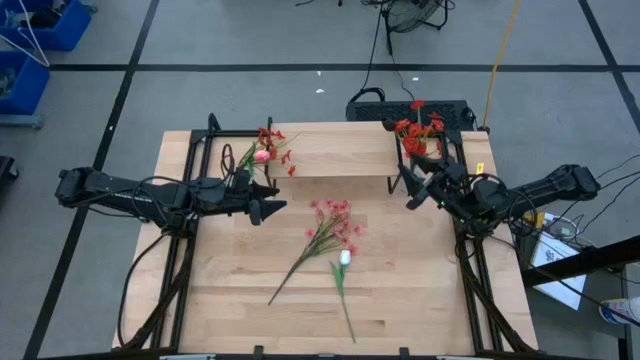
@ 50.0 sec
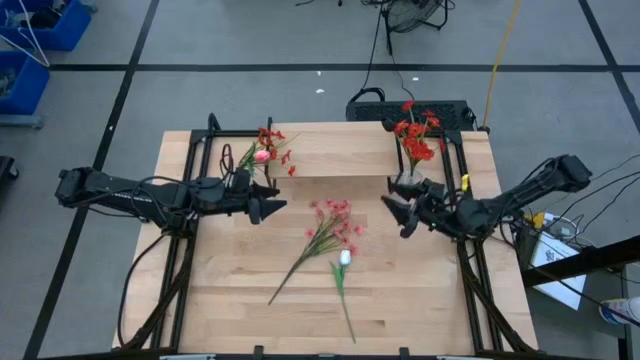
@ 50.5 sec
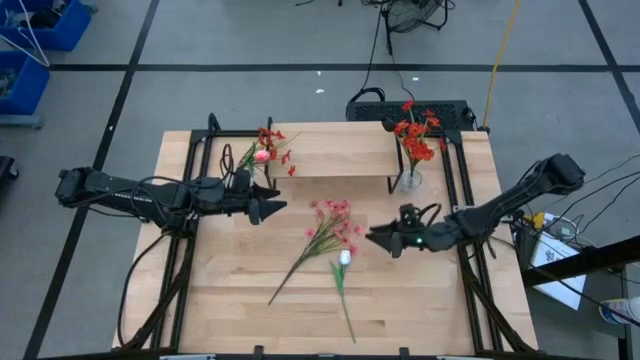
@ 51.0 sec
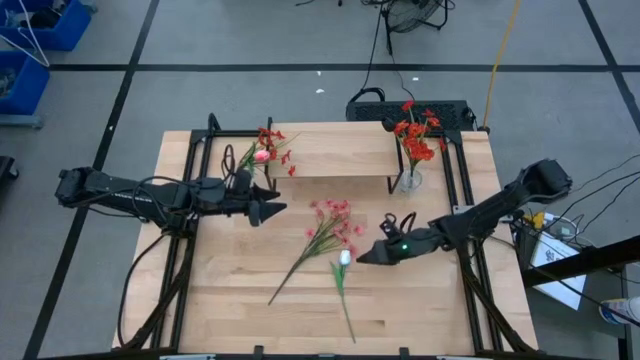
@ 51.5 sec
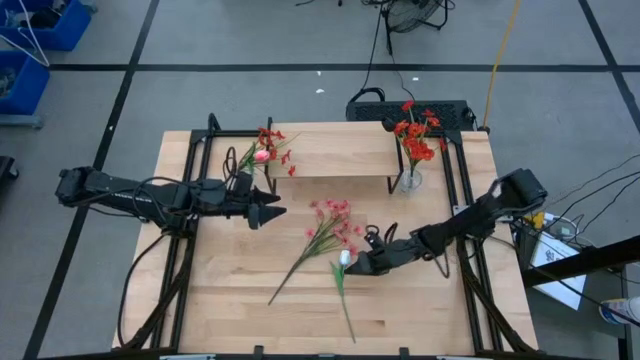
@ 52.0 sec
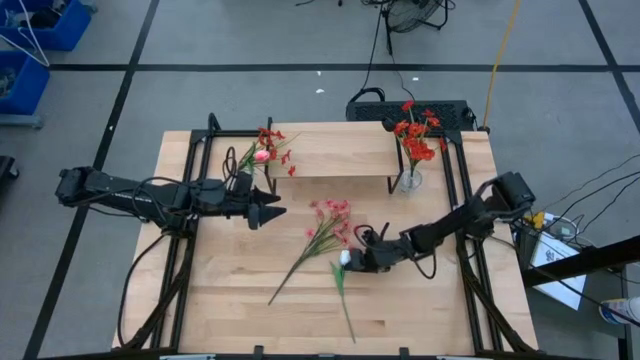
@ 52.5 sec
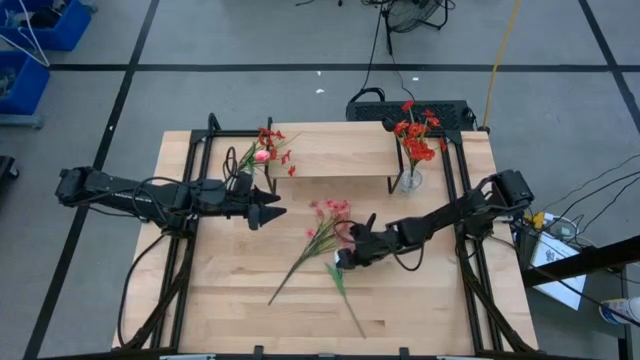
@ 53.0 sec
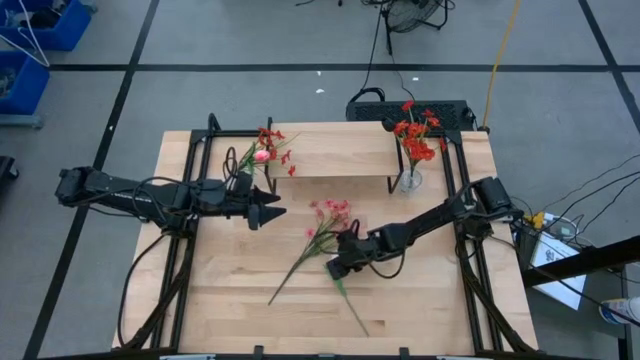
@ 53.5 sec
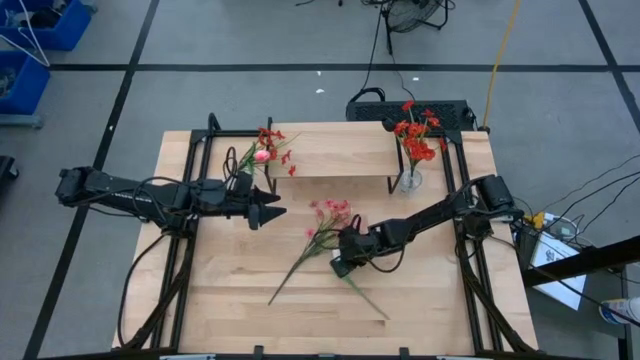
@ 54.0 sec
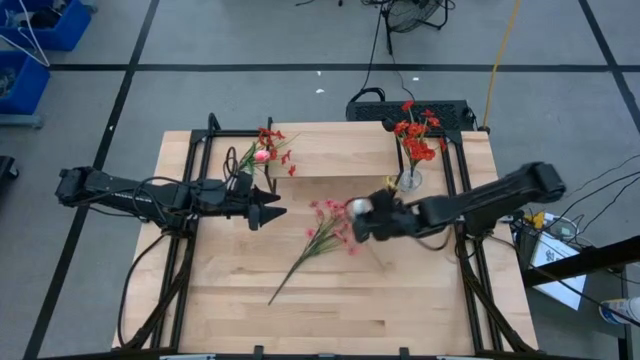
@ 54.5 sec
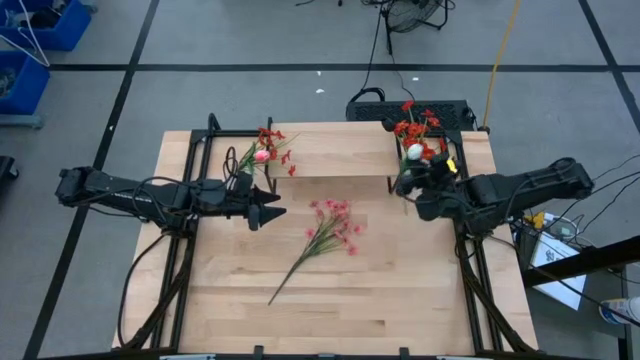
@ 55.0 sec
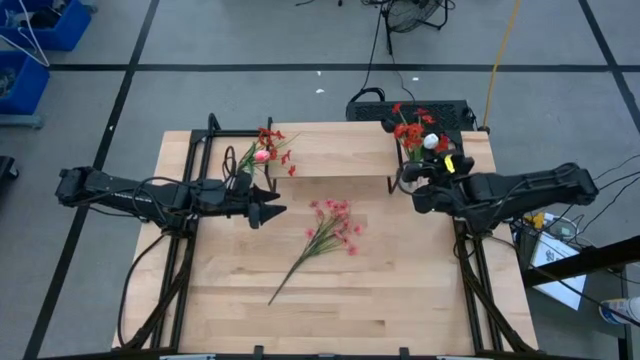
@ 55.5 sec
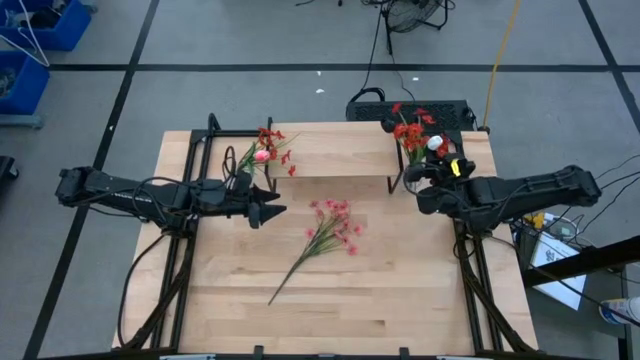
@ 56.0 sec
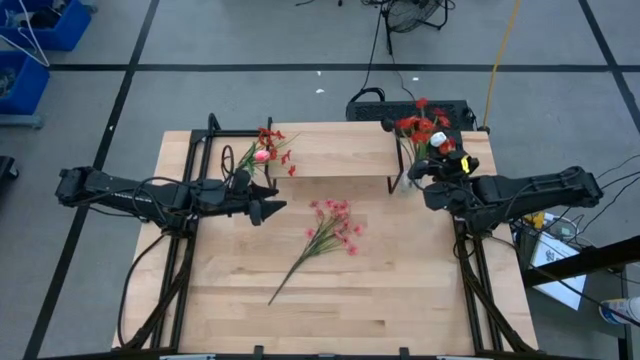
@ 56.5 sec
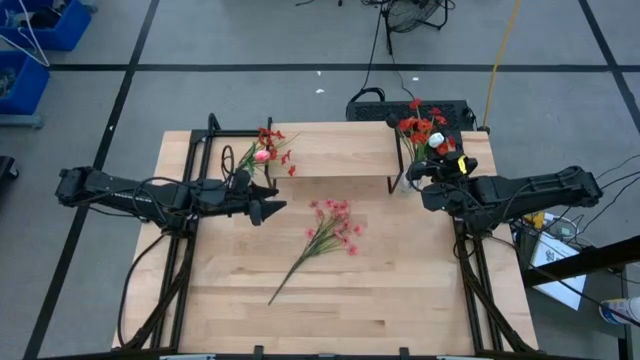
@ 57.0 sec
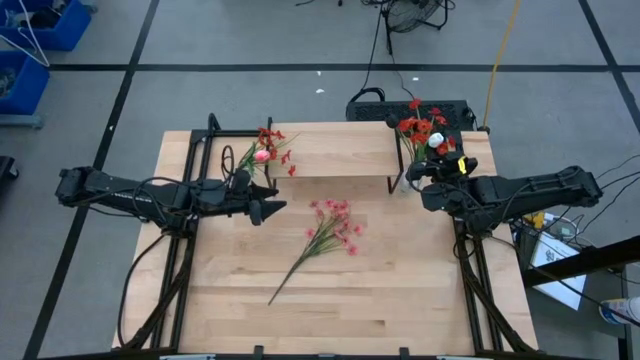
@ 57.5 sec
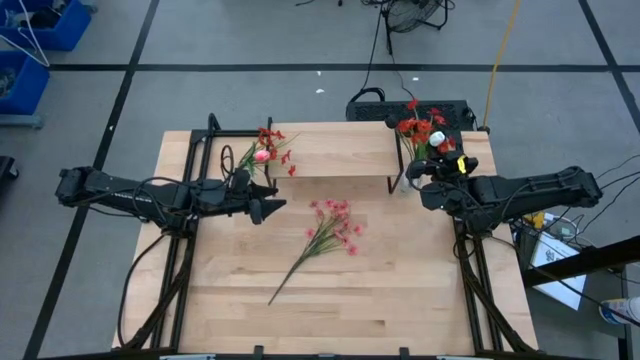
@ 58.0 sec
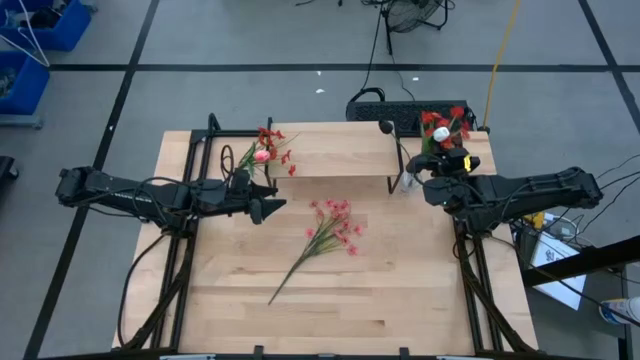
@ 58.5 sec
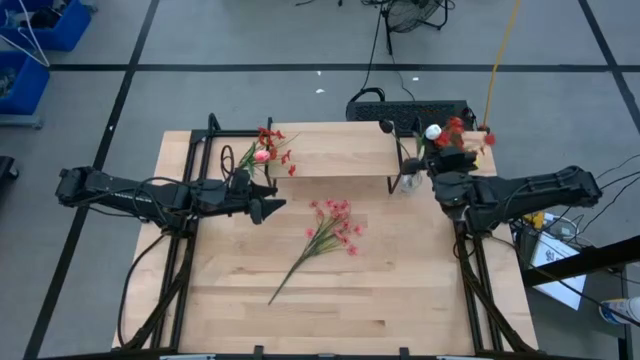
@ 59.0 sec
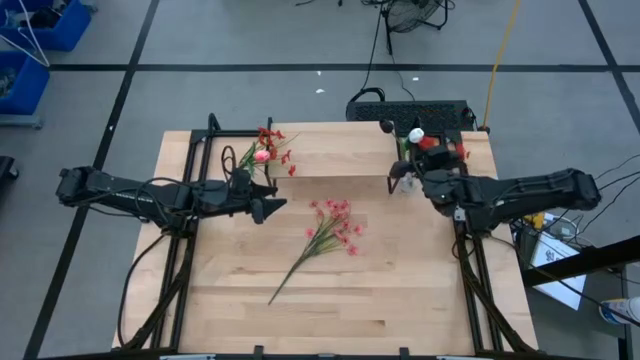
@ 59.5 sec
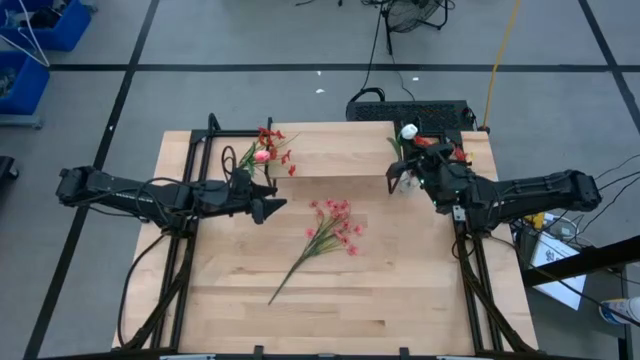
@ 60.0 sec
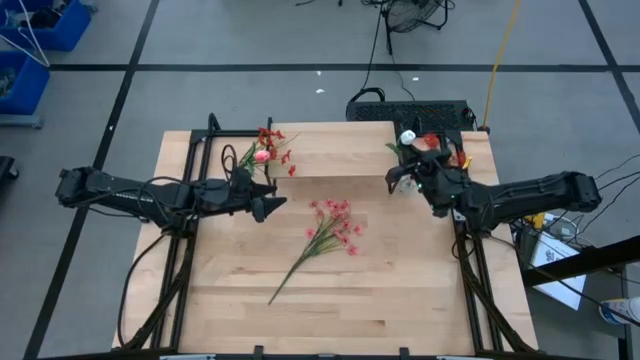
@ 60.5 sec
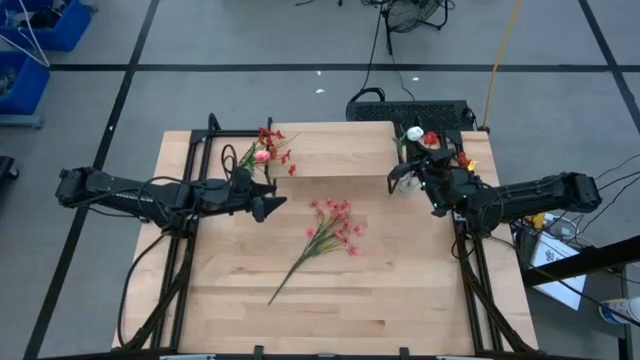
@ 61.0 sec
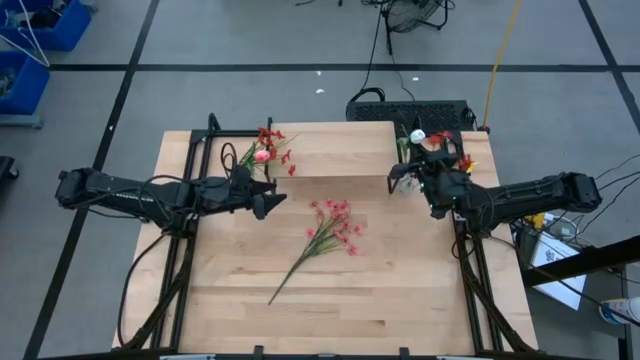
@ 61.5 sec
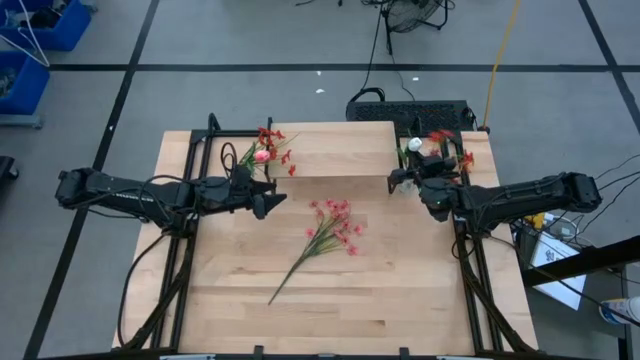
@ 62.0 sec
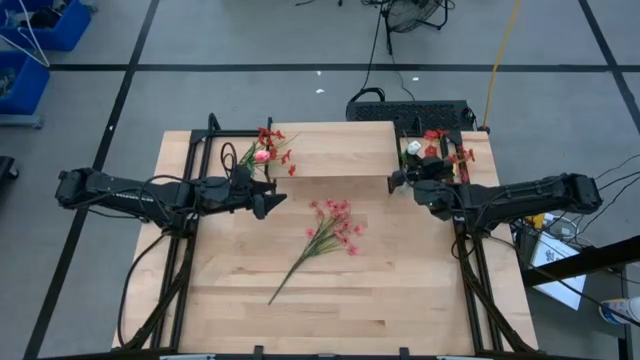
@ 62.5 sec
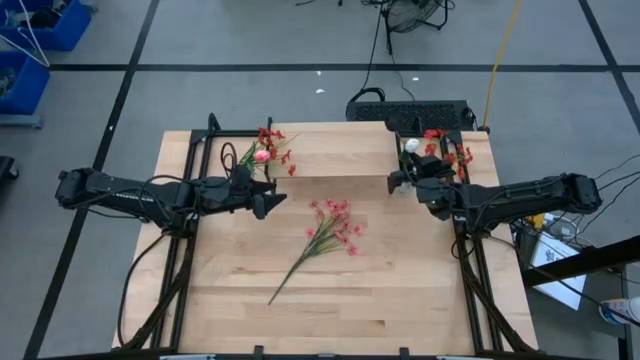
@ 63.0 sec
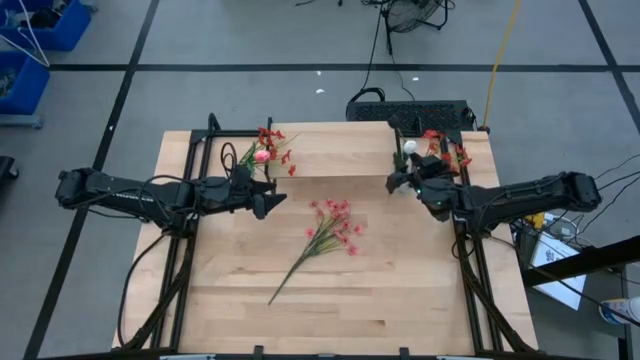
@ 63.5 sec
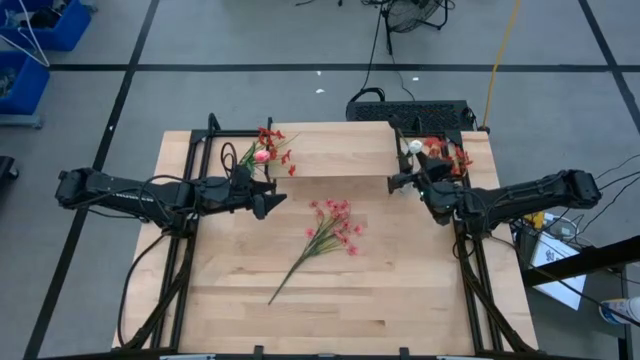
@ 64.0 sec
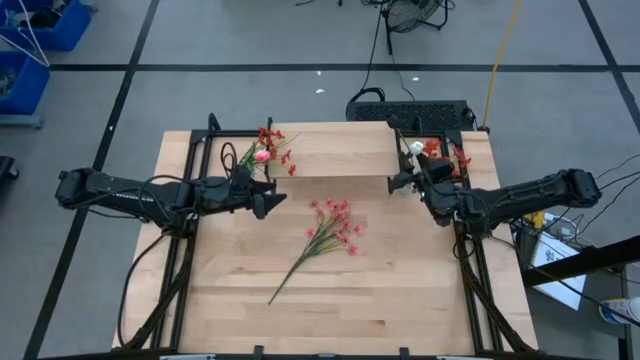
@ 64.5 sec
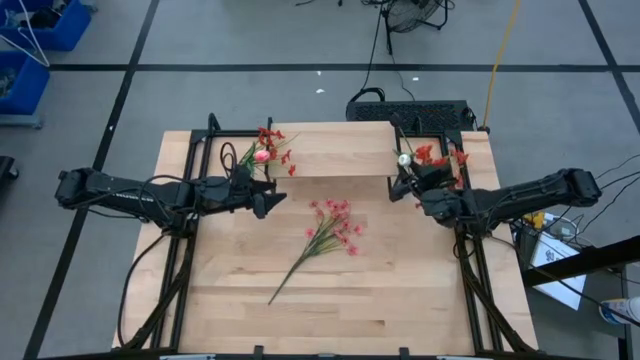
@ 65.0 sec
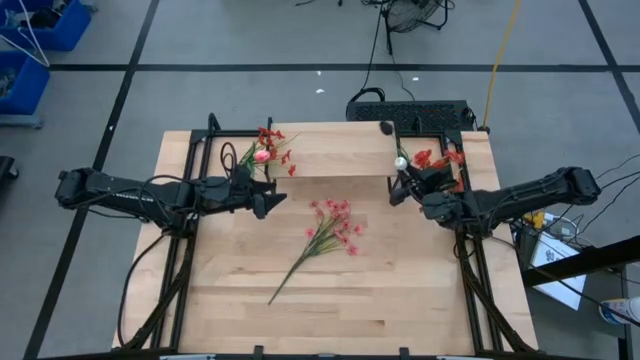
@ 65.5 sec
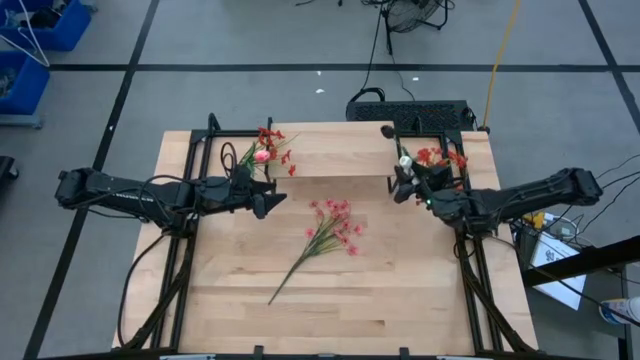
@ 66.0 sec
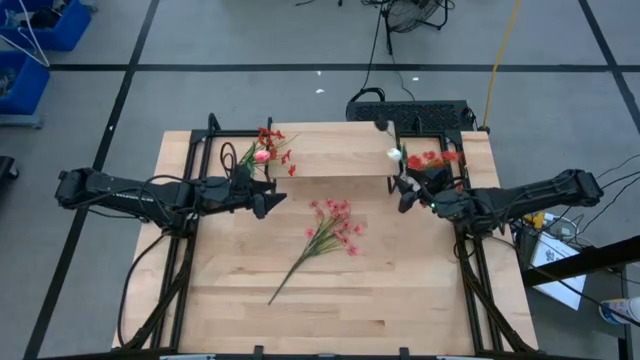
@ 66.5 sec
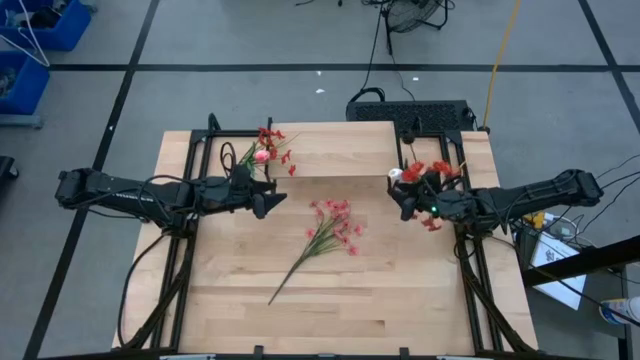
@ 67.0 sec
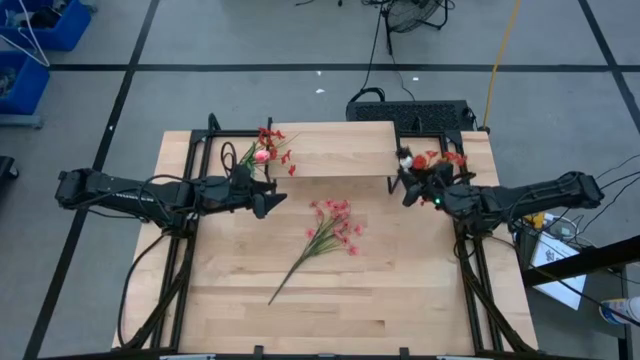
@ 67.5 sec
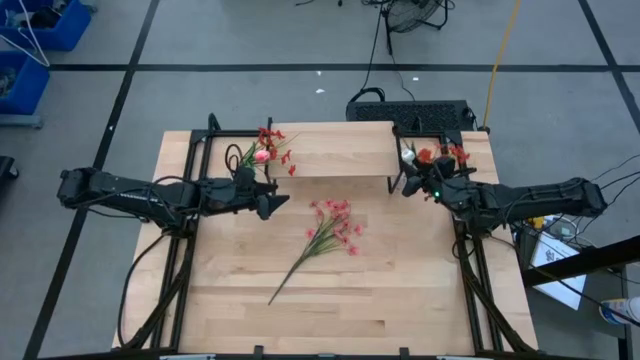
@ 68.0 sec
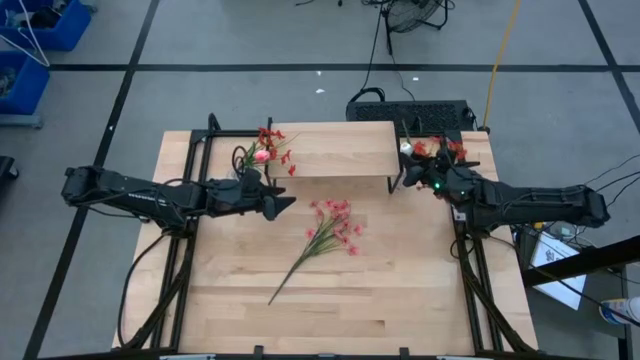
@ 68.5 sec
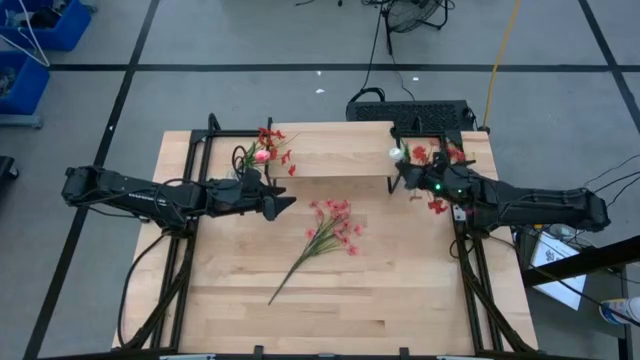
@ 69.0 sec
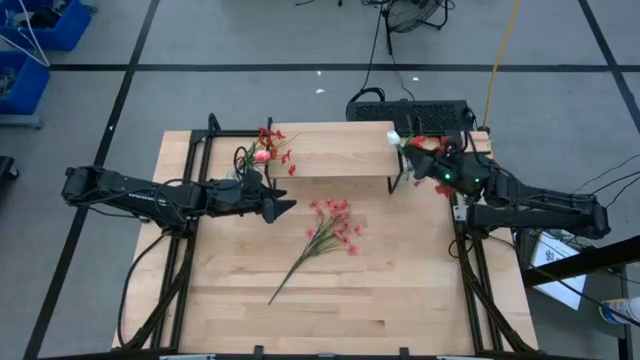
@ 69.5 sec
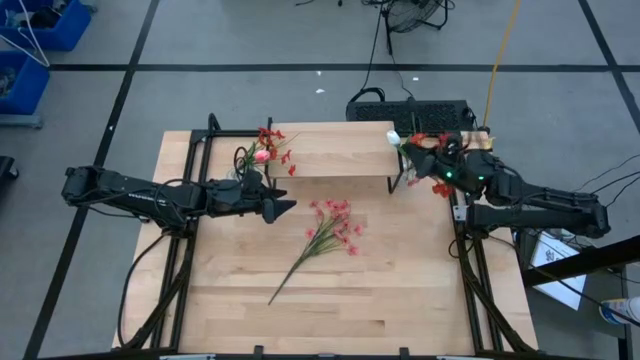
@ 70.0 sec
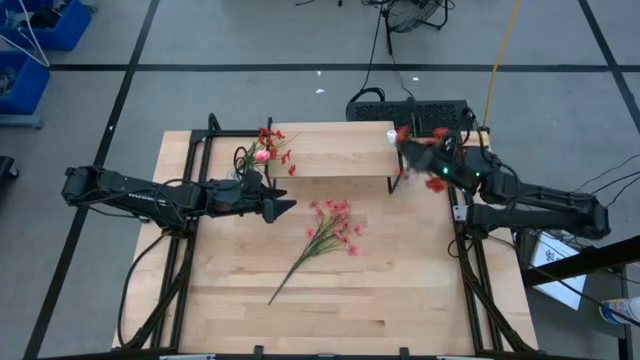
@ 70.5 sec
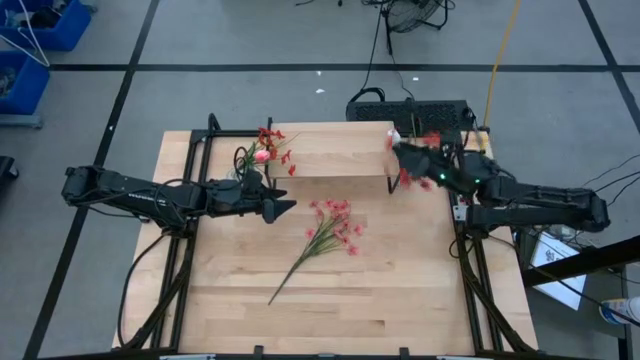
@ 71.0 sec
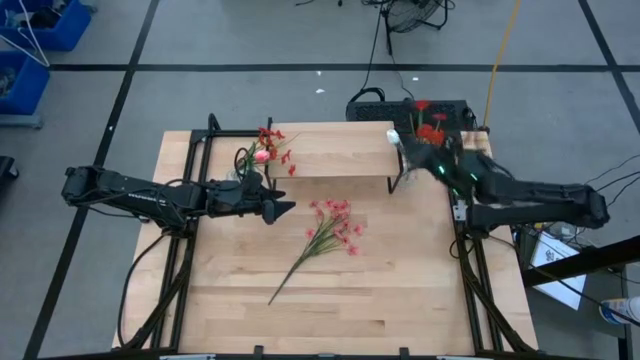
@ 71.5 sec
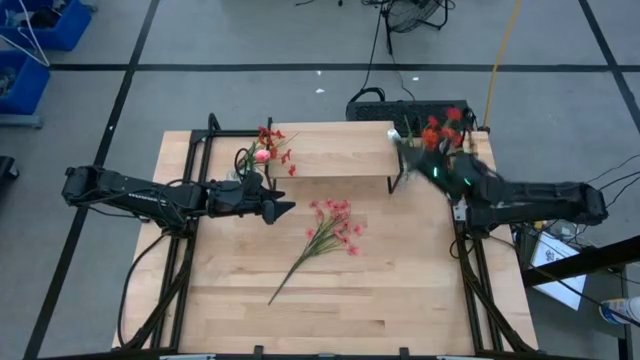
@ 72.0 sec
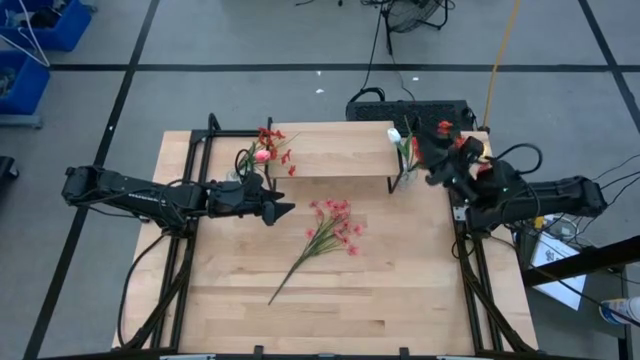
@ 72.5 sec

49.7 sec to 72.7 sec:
Task: Pick and place flowers into a vace then onto a shelf
Put the white flower into the right transparent vase
